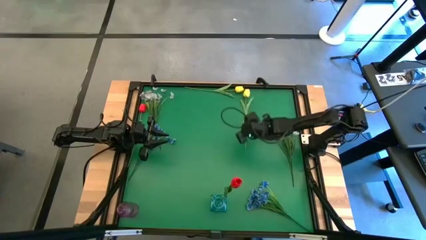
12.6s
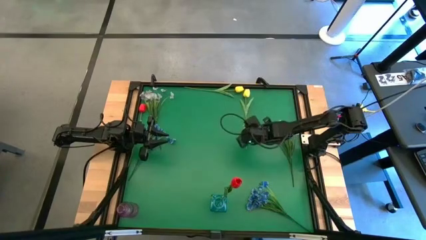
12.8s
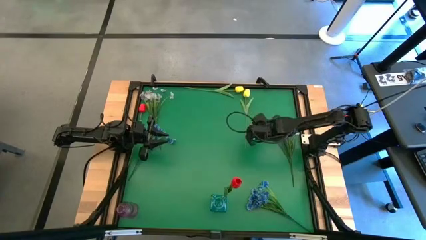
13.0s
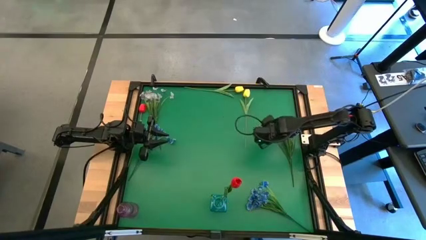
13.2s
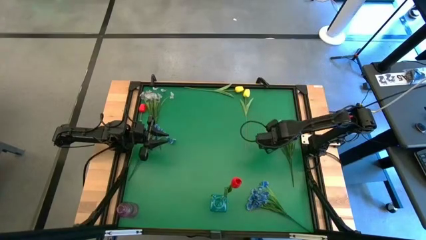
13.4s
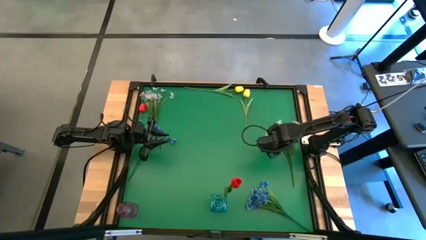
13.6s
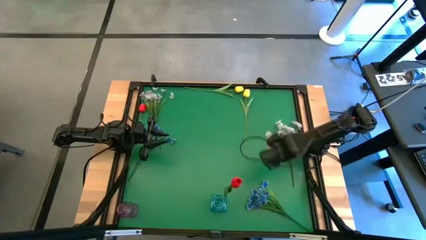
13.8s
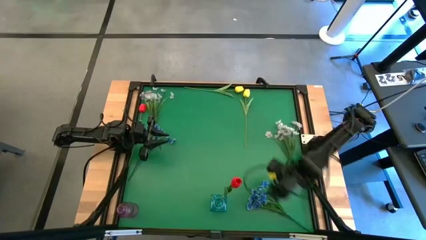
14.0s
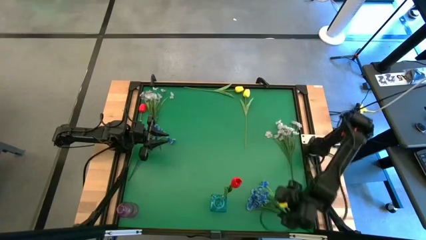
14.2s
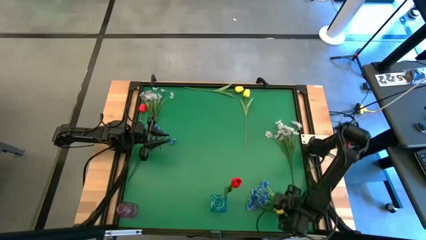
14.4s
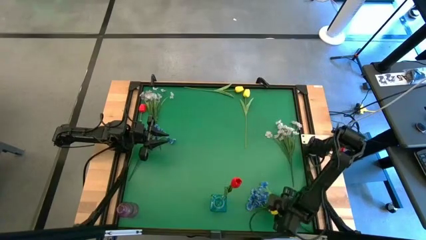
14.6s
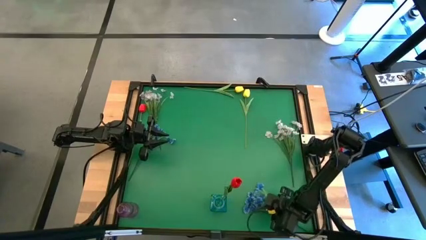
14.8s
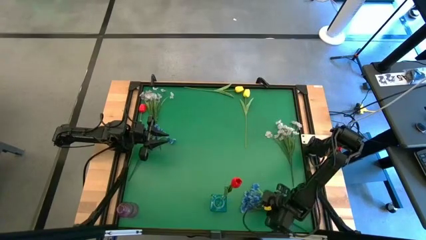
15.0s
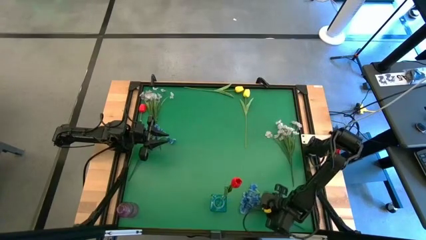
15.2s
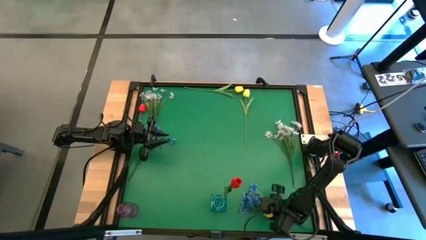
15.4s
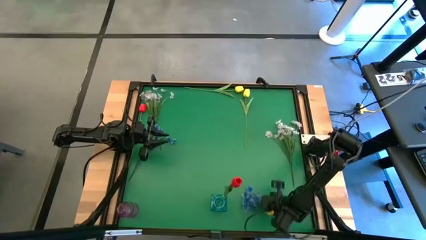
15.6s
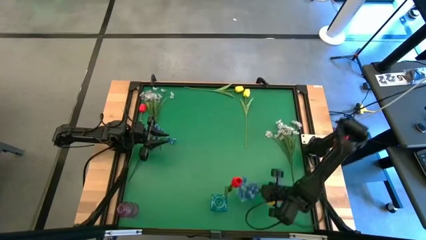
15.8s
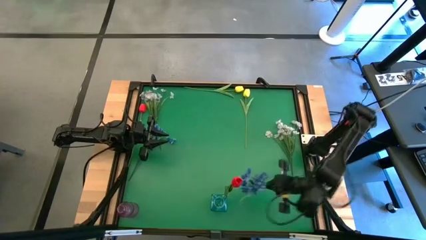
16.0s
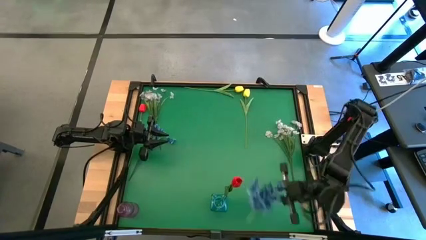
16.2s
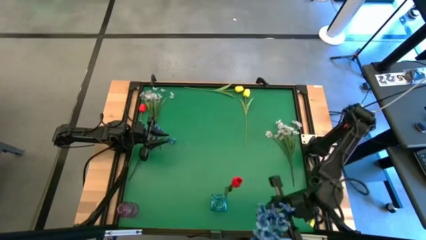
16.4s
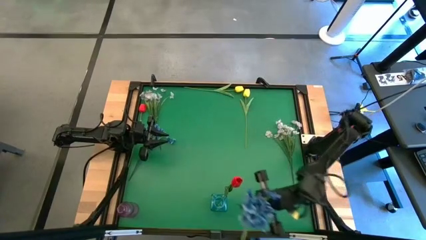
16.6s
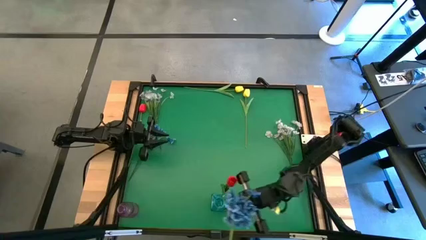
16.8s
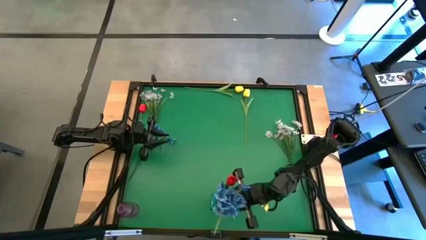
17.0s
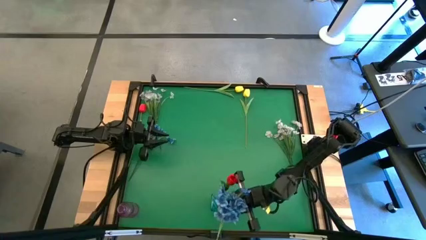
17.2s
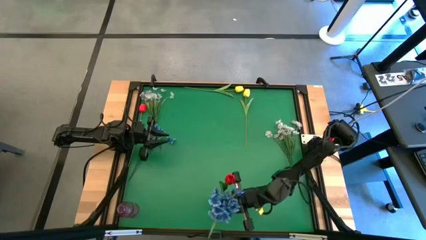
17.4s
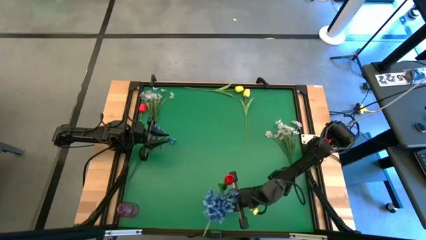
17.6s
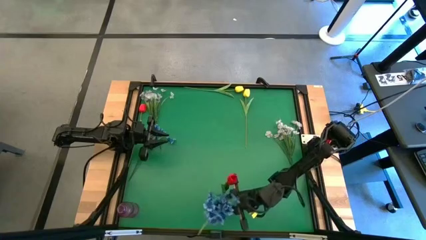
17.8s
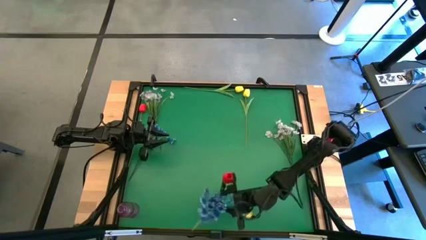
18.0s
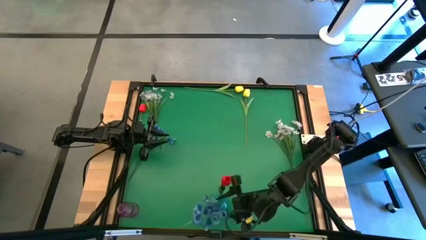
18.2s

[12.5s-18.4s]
Task: Sort flowers into vase by color
Put the bottom blue flower into the blue vase

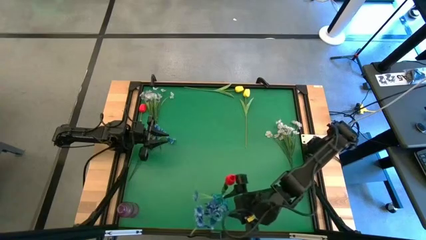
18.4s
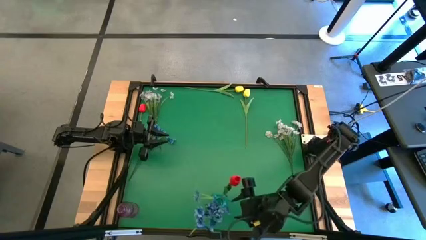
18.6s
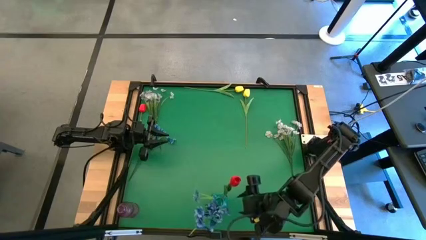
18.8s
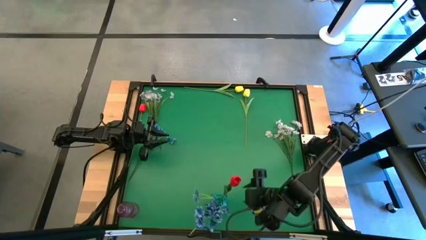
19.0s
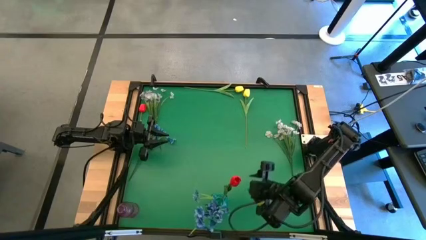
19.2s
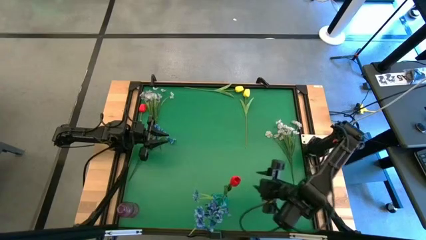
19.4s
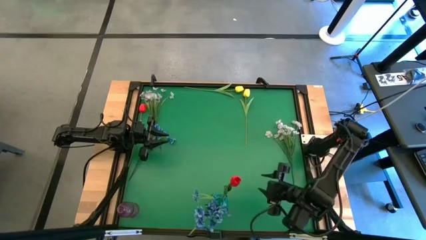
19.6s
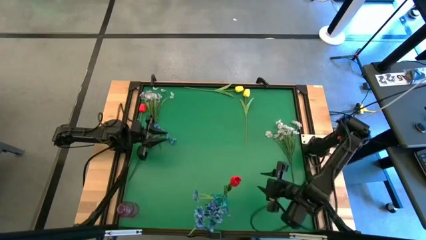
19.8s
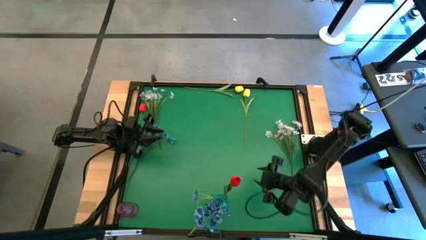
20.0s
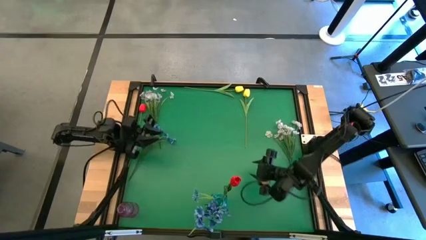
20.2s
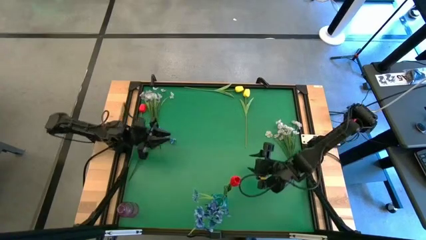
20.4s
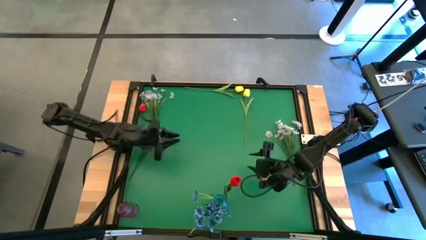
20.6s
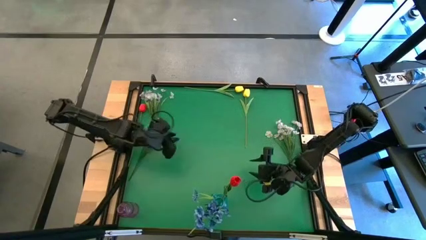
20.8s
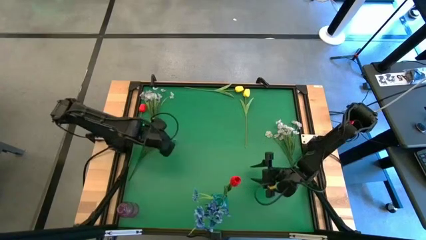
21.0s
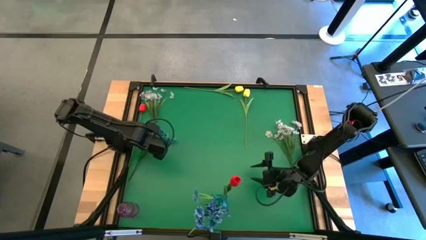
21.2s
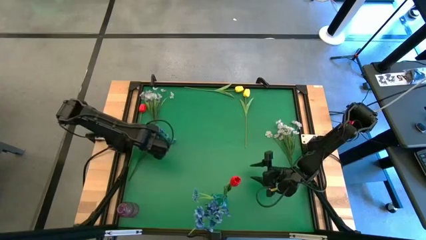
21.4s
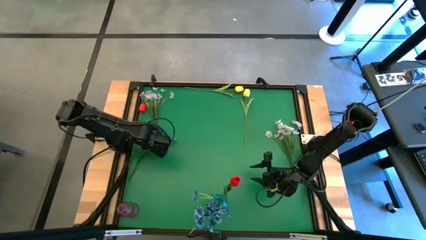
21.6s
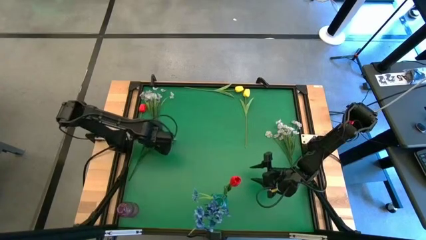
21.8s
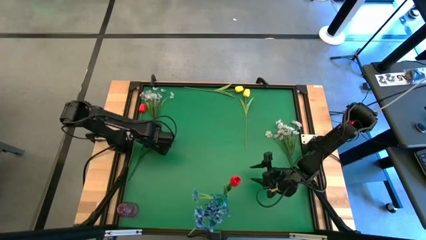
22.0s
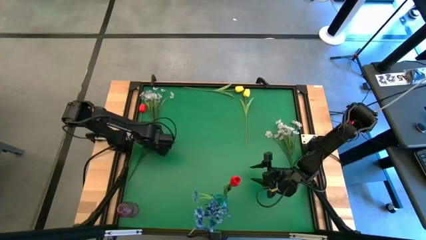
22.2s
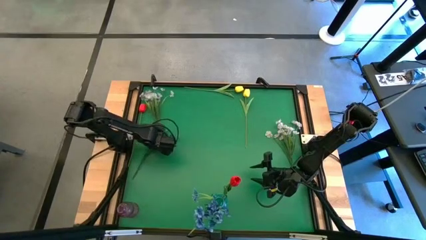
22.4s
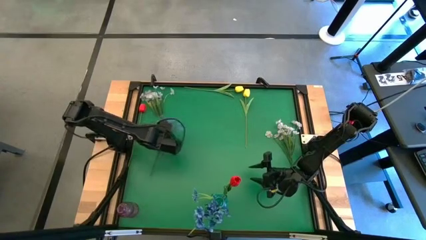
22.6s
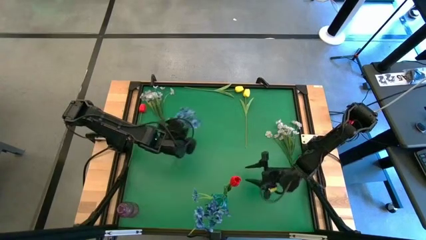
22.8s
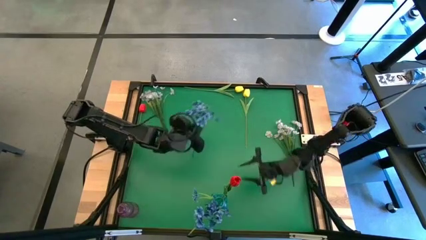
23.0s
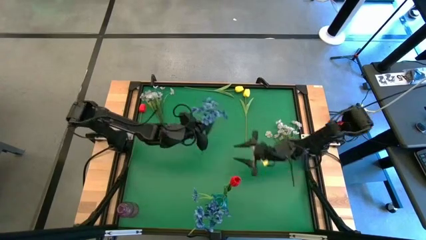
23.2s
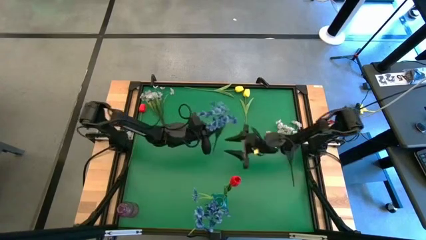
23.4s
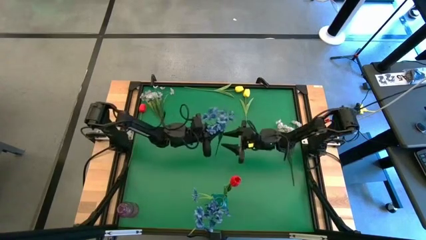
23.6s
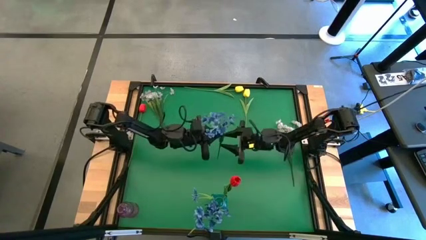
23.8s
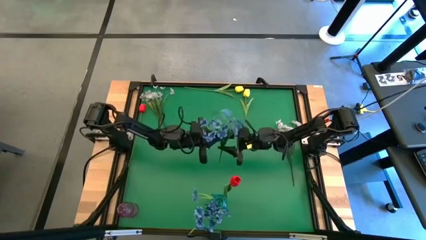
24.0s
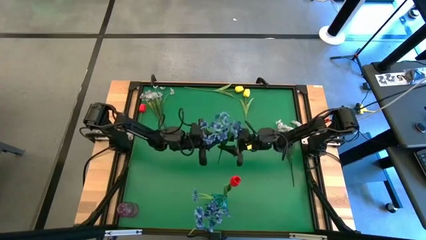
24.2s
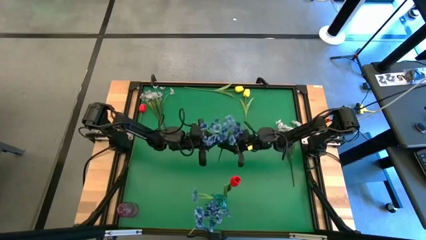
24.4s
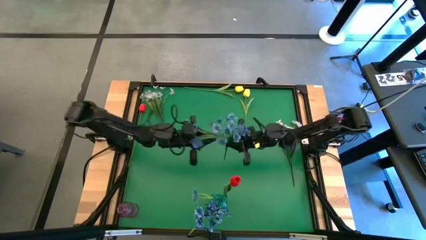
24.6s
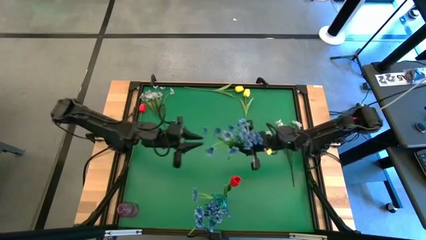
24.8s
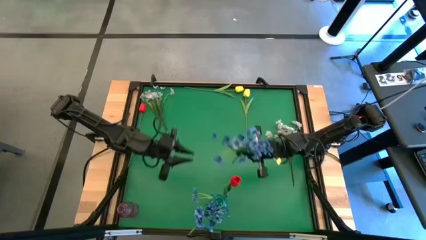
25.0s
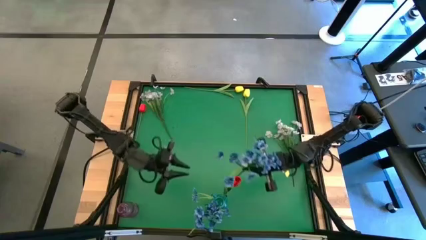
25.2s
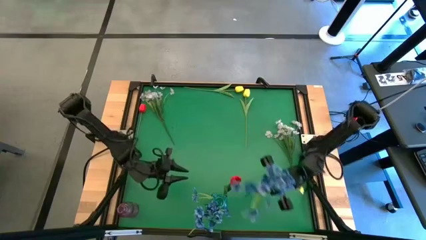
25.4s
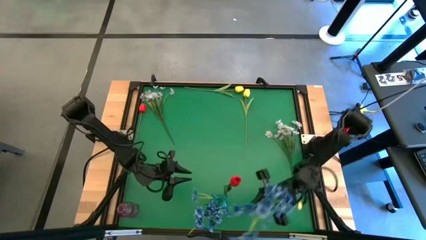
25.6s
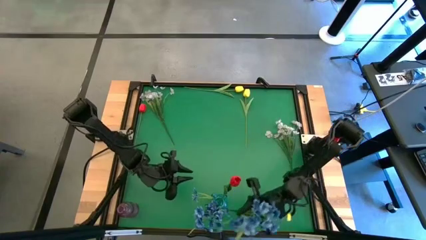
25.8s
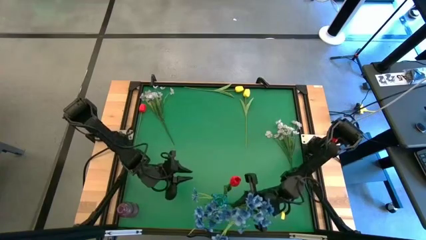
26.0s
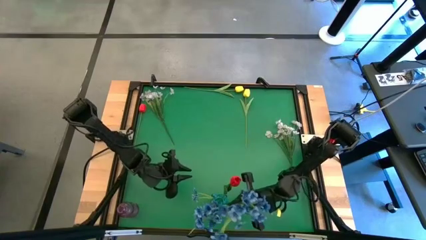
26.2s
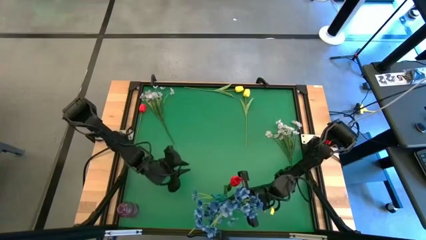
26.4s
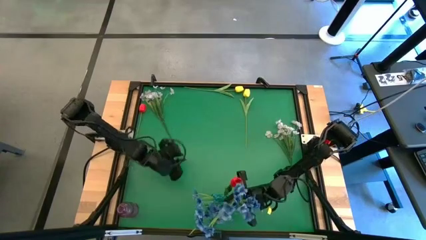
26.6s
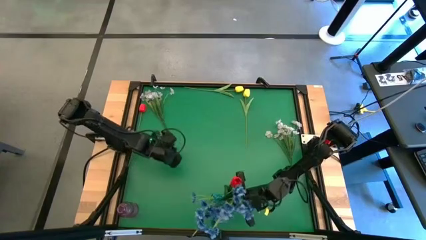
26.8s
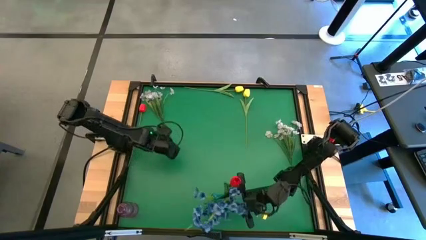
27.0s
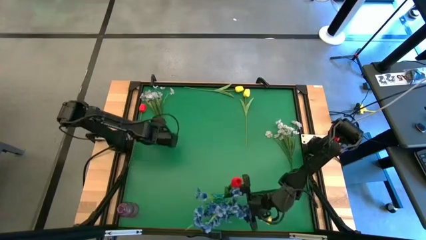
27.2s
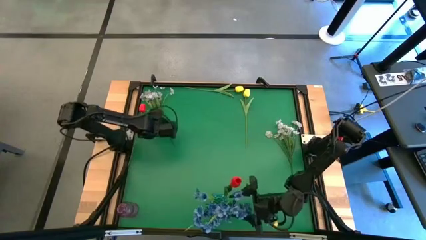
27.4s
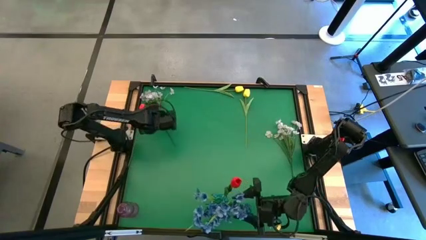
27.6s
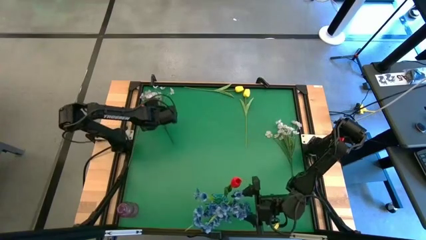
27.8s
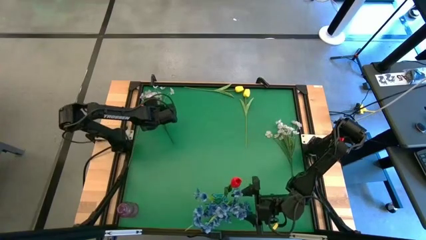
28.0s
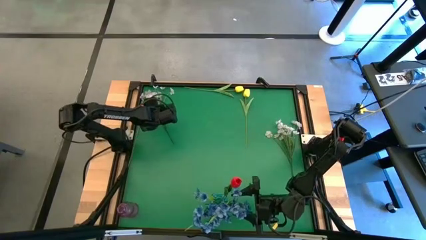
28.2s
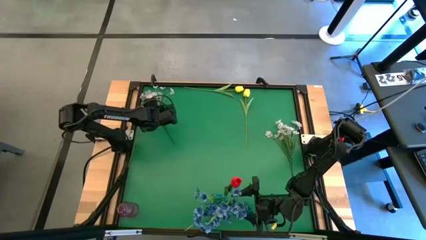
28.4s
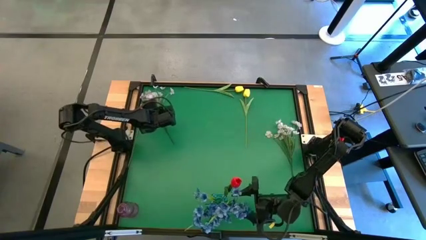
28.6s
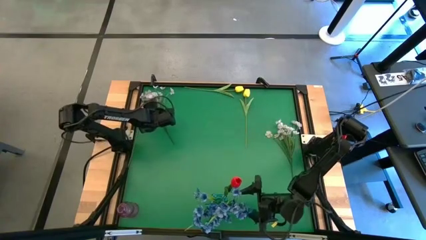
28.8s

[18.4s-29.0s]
Put the blue flower into the blue vase
